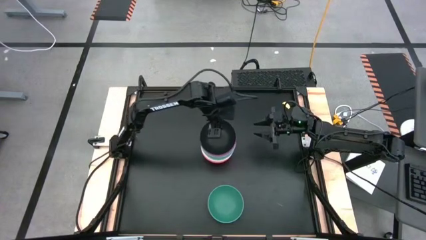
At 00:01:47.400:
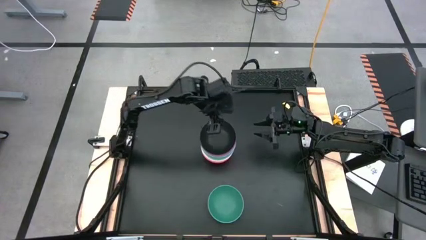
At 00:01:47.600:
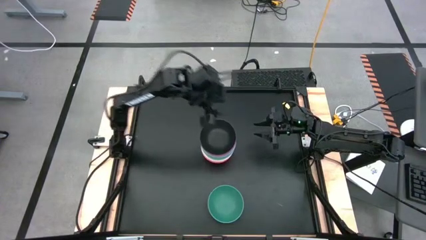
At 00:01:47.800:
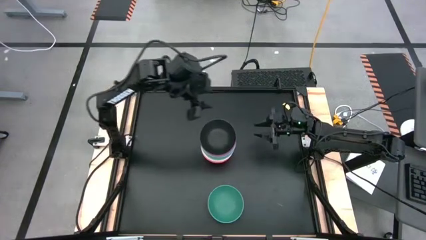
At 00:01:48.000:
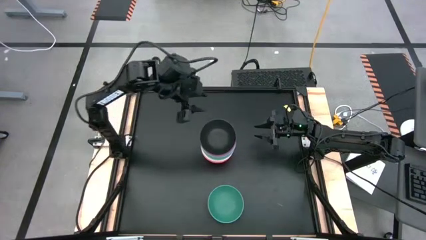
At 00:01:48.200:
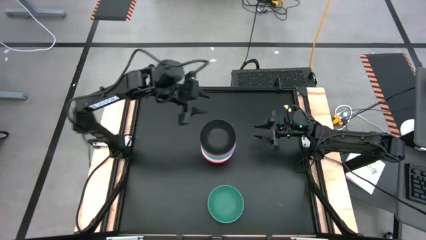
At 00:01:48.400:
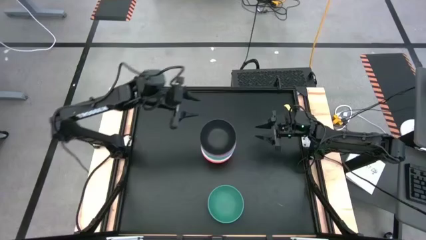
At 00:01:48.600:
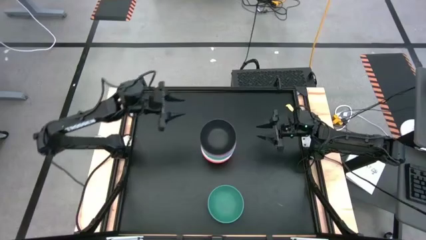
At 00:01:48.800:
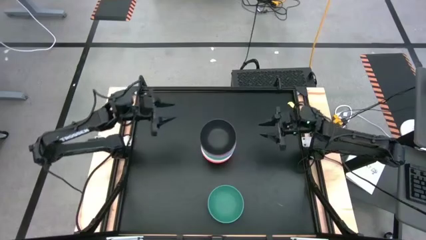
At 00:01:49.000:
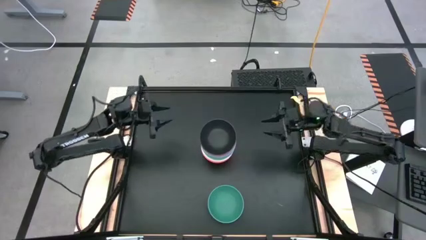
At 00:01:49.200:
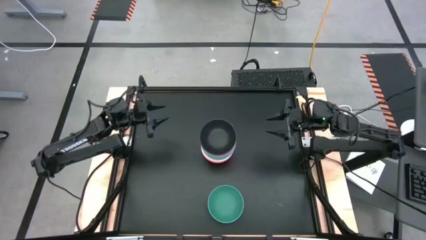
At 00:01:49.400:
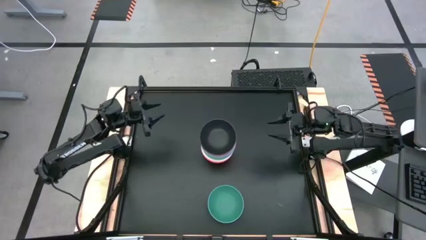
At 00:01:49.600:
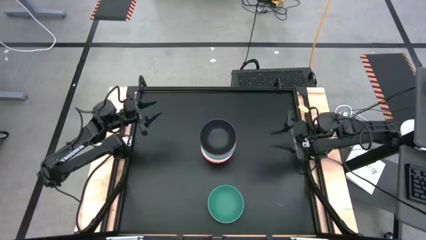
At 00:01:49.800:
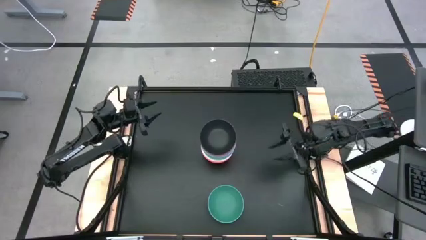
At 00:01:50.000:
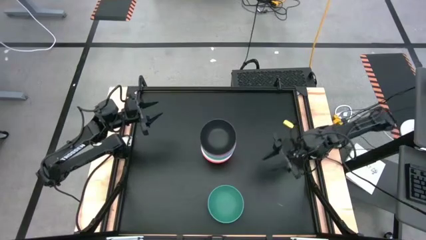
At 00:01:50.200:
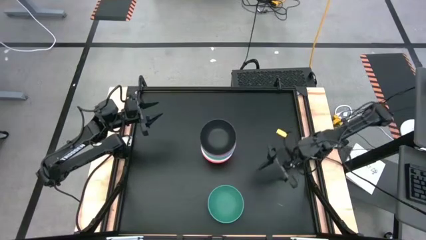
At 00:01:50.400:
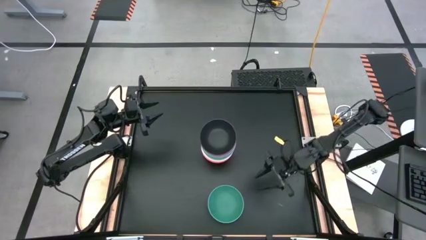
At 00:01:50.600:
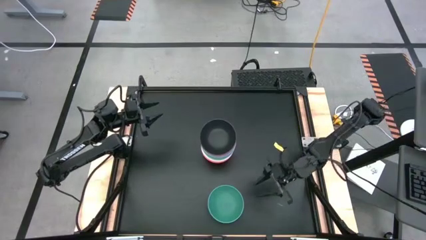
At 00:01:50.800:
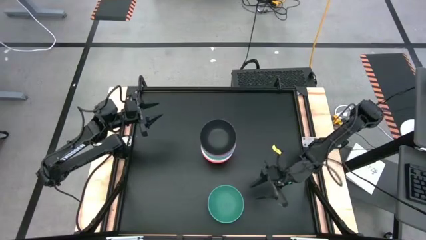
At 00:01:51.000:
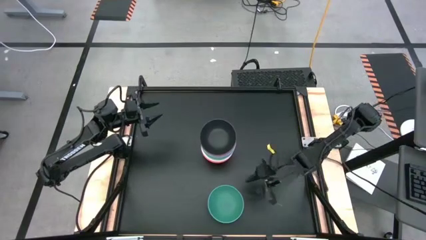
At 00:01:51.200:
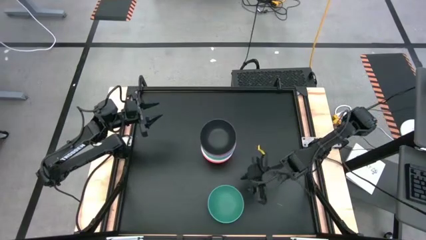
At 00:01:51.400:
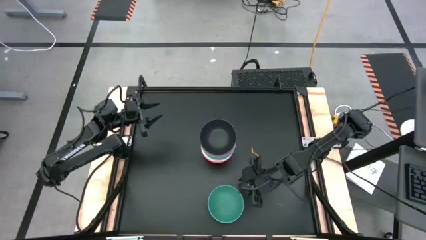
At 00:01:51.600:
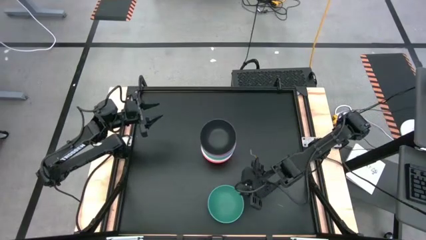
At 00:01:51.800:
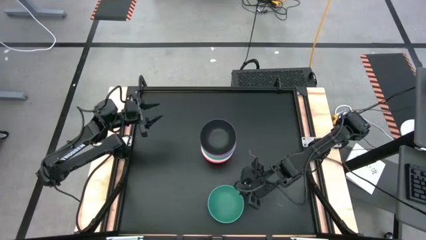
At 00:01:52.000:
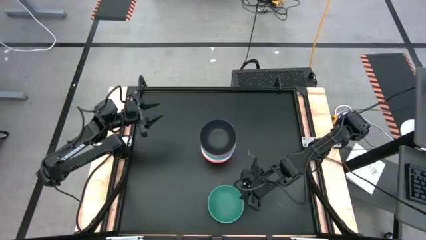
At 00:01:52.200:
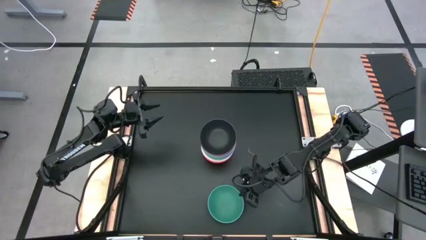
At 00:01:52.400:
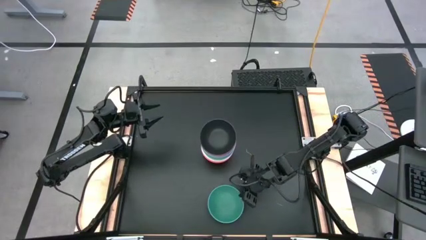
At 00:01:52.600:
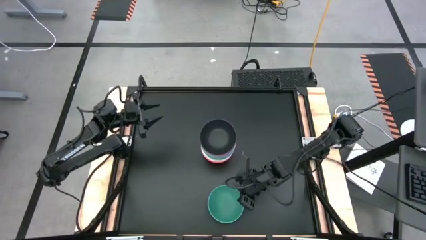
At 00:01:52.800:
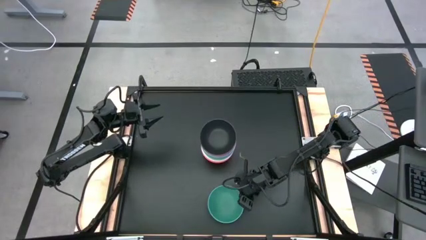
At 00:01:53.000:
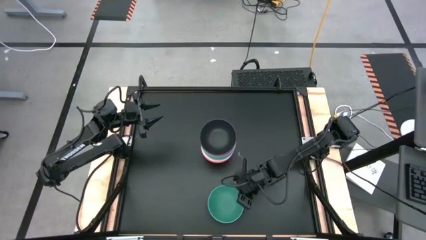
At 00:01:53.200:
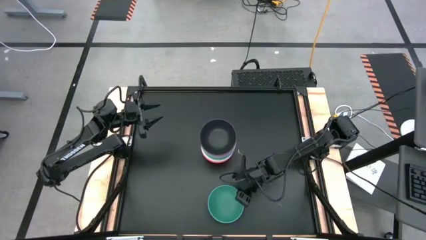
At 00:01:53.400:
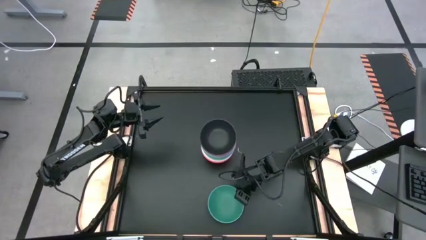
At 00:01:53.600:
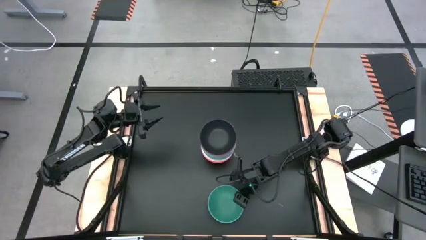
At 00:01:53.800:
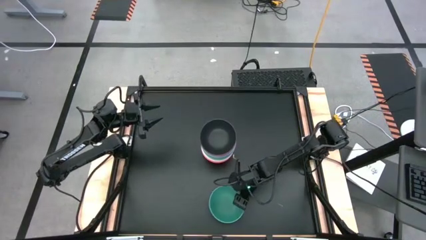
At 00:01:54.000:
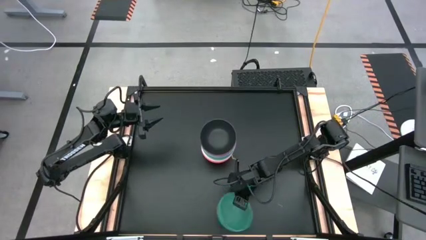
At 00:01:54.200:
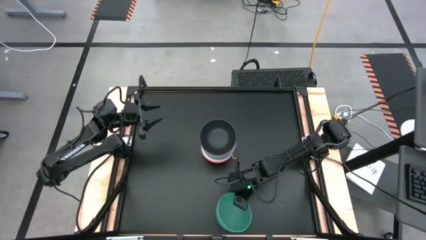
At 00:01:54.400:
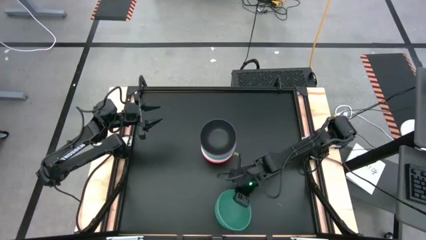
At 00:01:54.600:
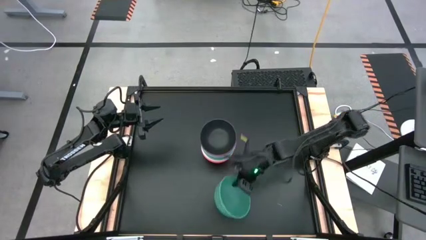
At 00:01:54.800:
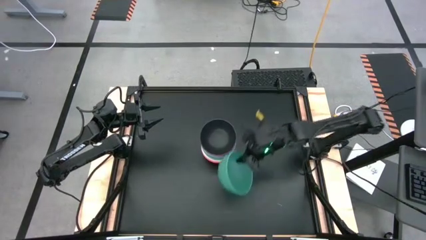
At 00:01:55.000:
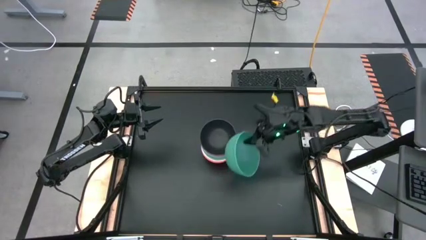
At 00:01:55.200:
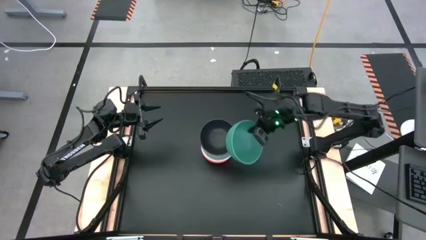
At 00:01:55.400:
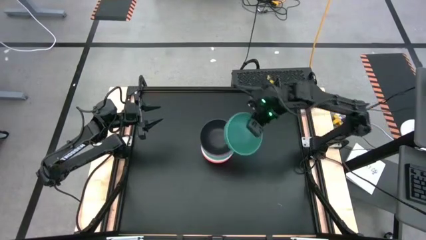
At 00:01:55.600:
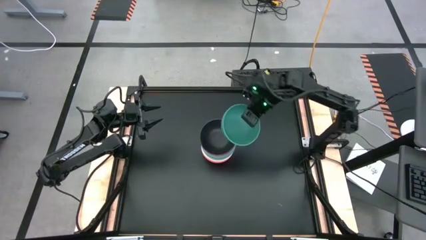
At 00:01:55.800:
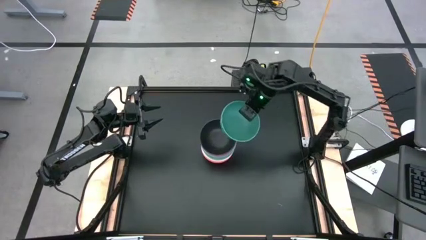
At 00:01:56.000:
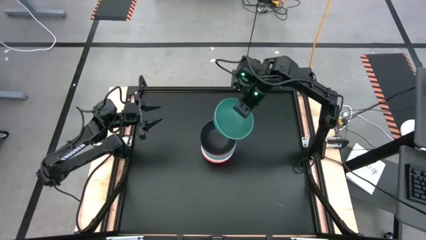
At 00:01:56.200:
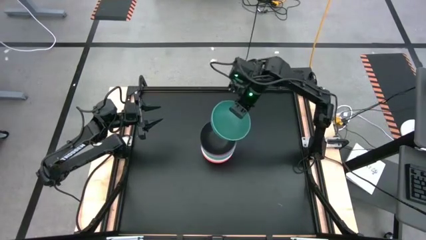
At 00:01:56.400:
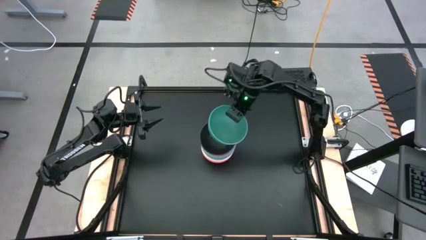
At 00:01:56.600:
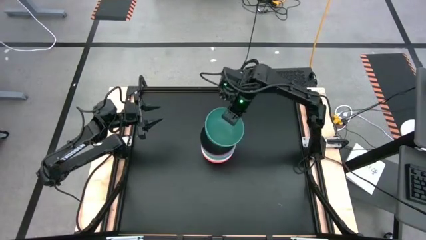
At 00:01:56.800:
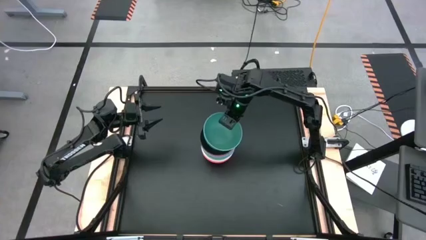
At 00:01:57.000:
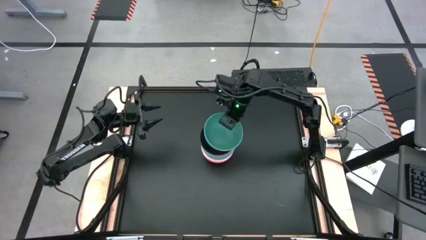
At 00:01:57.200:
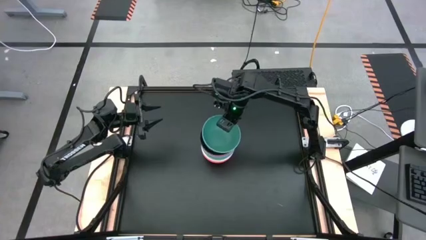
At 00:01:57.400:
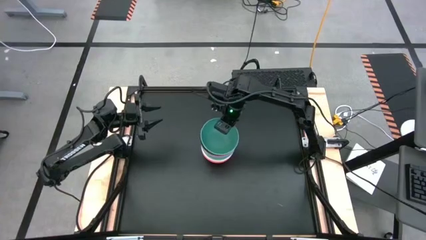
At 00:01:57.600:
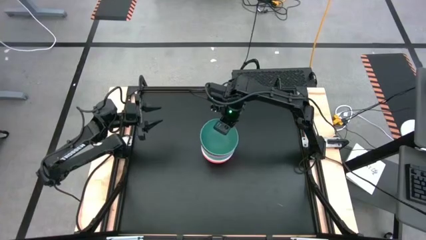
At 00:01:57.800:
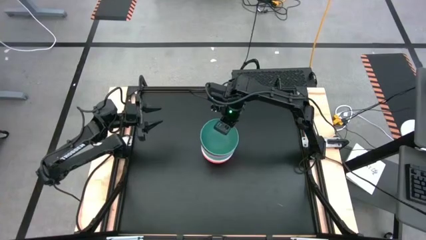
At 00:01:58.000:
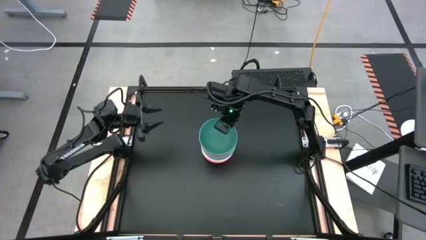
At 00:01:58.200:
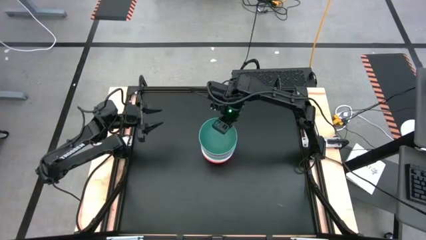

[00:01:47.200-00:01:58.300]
Task: Nest bowls inside each other
Stack the dark green bowl on the black bowl

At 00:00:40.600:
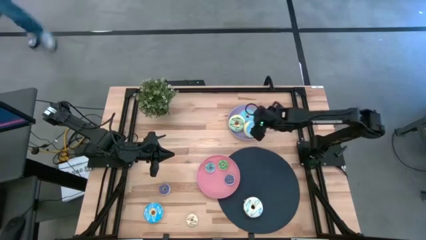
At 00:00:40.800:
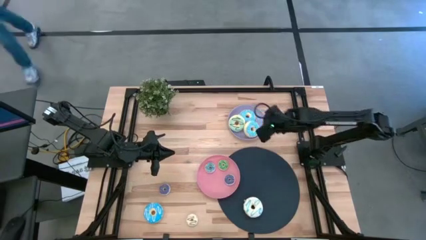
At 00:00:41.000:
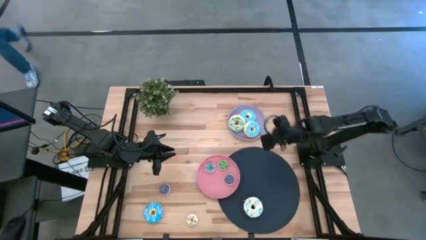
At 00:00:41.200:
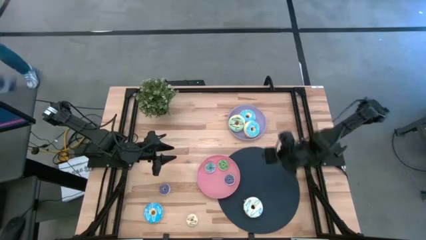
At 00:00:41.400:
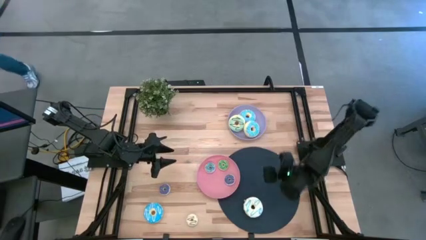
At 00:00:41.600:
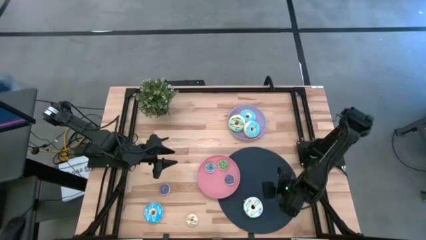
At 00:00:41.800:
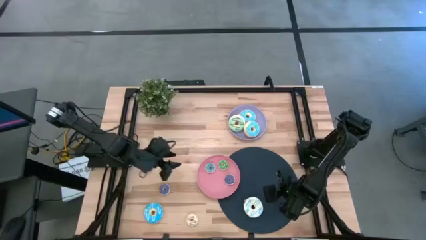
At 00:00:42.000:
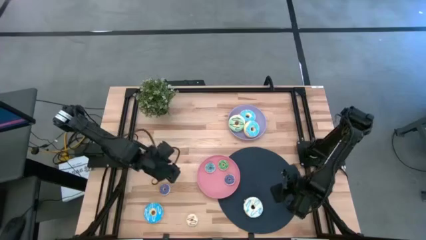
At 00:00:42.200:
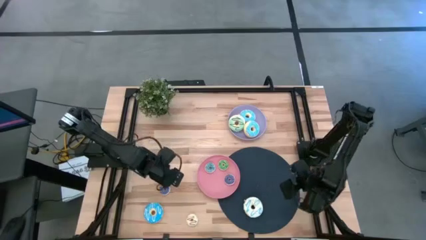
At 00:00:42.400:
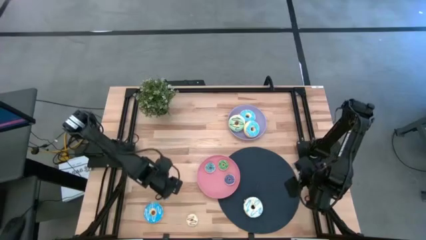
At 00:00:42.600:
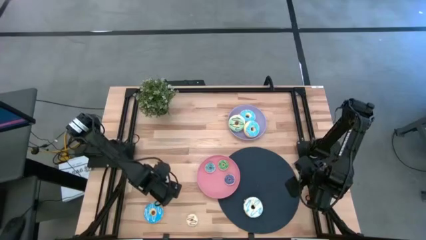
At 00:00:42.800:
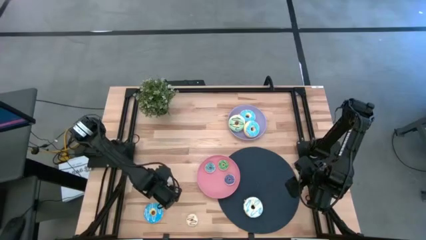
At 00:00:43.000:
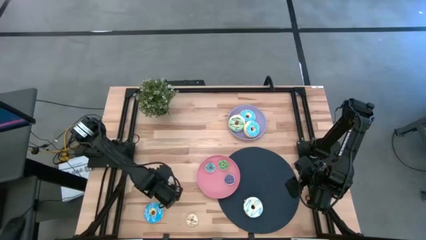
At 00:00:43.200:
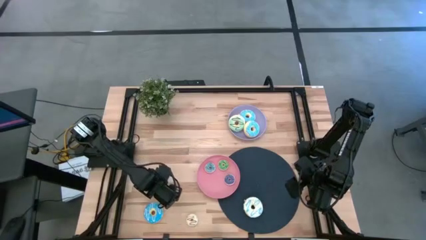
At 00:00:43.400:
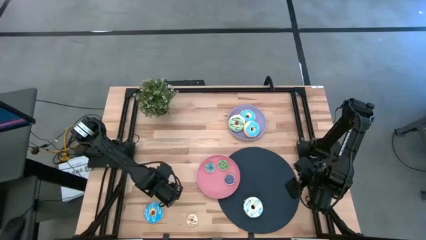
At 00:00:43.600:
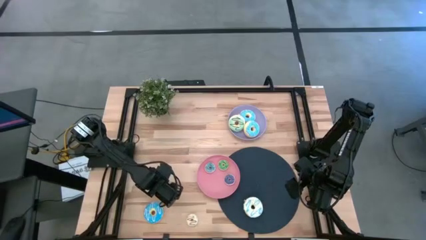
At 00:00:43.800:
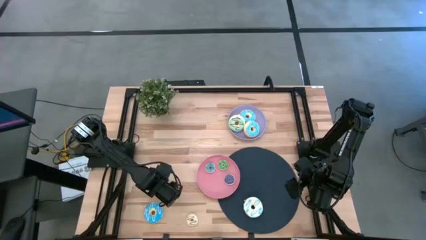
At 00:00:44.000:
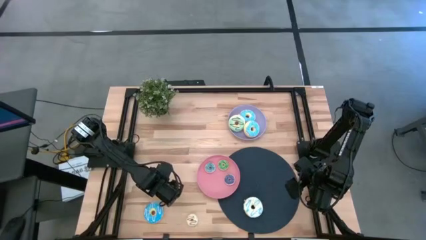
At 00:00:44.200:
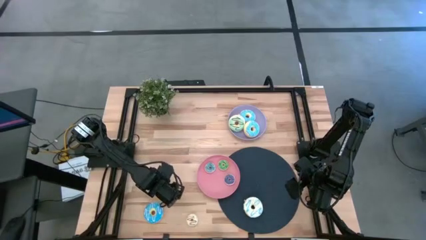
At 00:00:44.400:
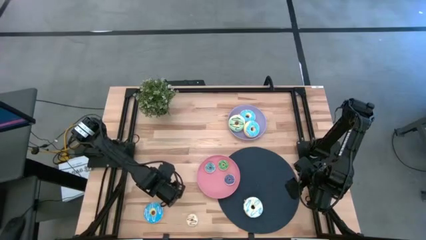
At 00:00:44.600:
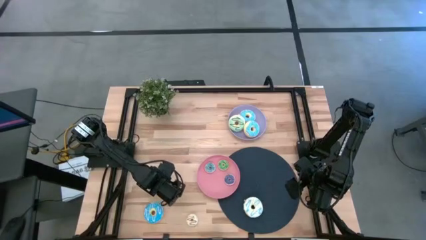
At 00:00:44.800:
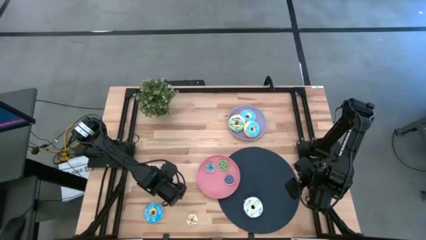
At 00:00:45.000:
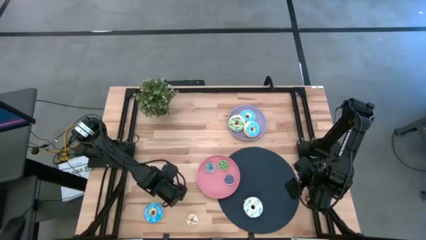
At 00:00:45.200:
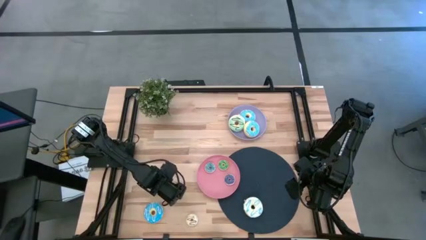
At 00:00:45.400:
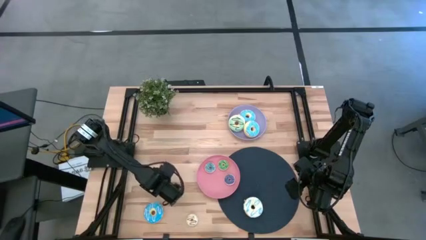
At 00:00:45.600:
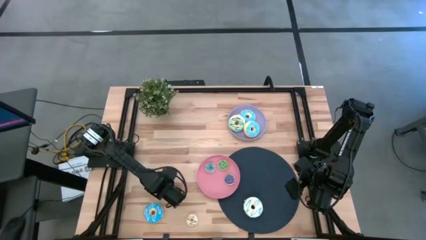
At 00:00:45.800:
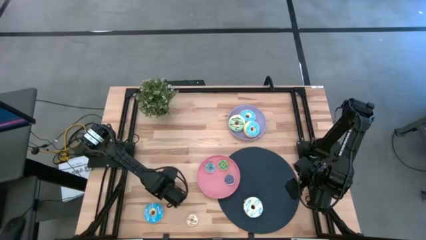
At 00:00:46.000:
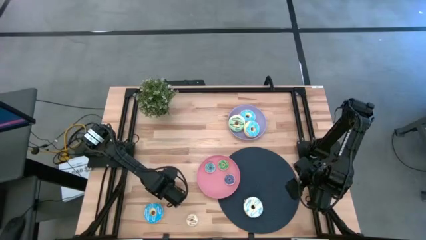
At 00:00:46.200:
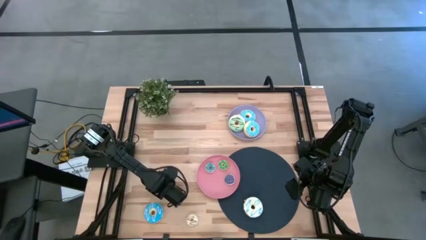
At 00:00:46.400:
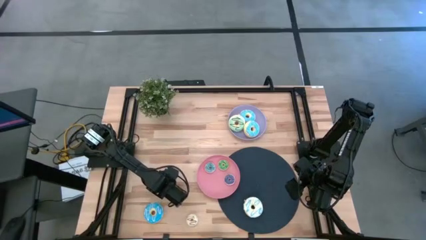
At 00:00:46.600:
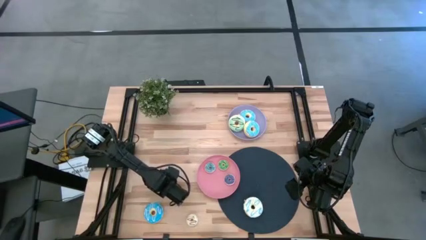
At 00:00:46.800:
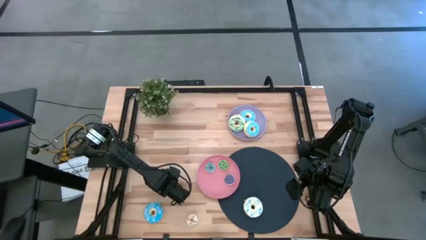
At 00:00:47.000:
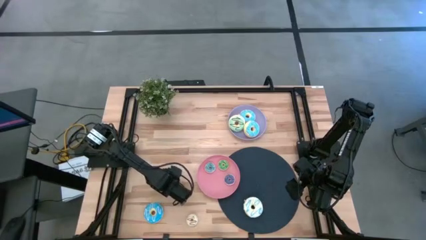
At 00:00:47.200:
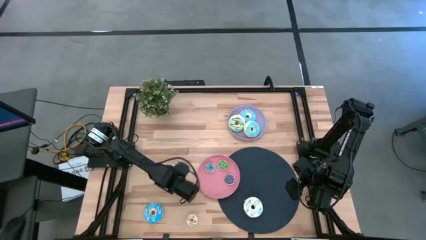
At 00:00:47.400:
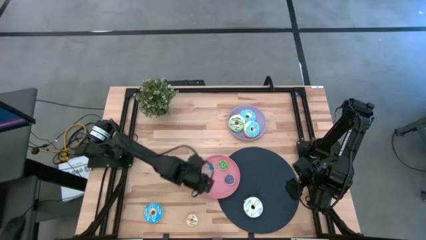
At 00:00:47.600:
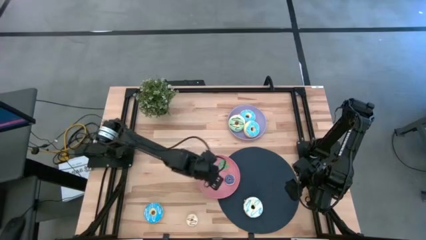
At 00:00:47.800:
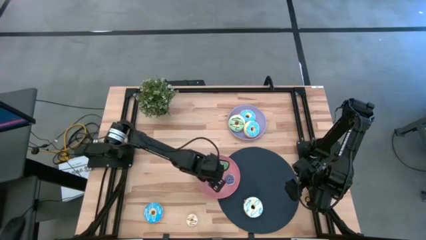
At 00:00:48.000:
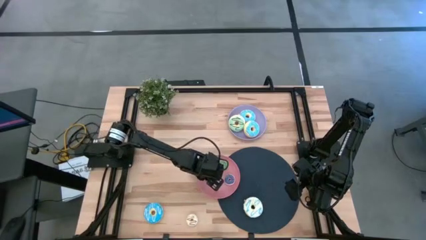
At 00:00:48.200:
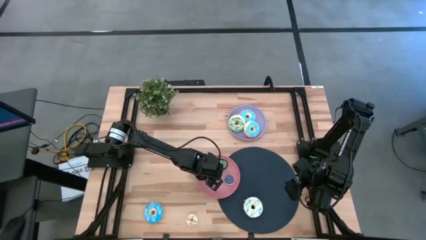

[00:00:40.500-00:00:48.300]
Task: Pick & Place donuts
Put the small purple donut on the pink plate
